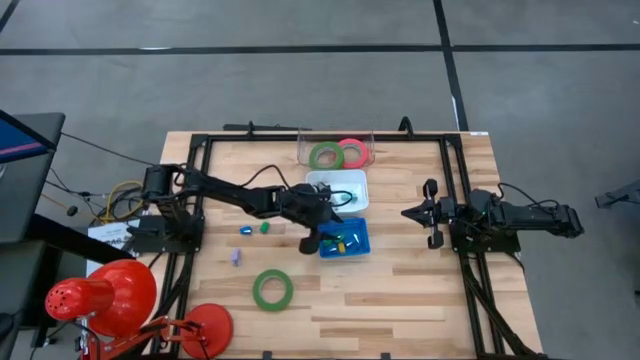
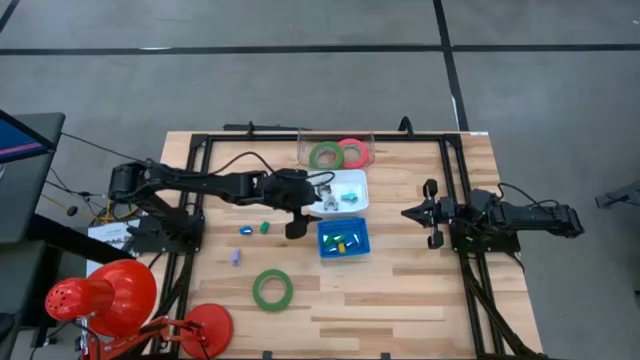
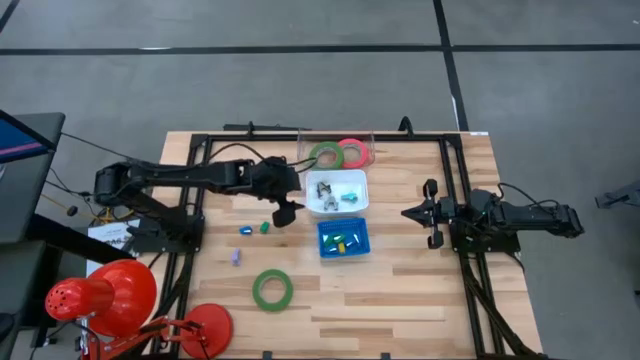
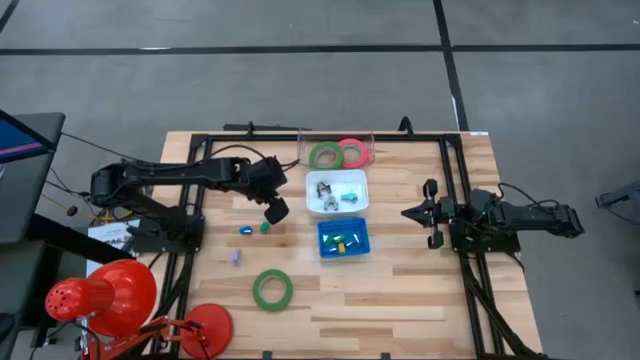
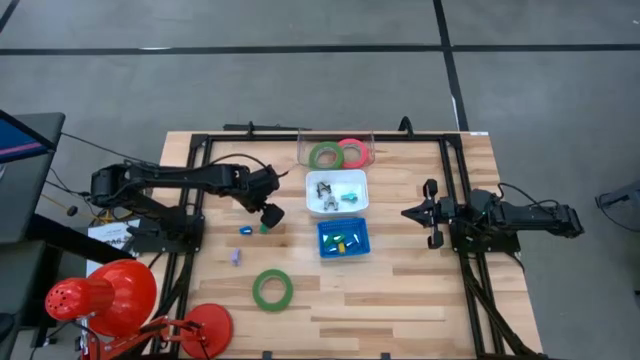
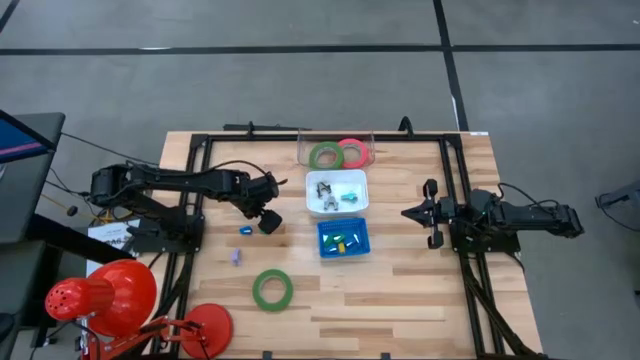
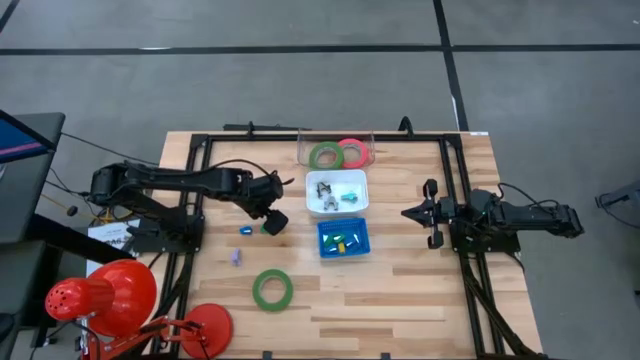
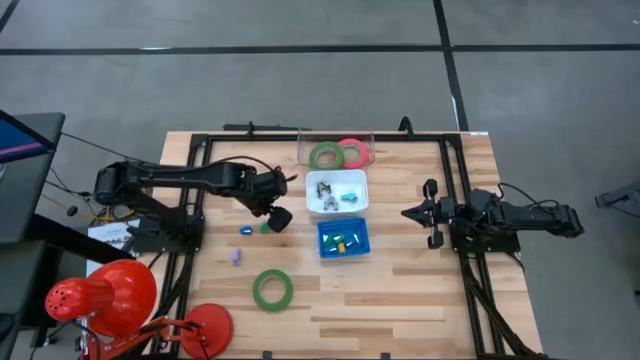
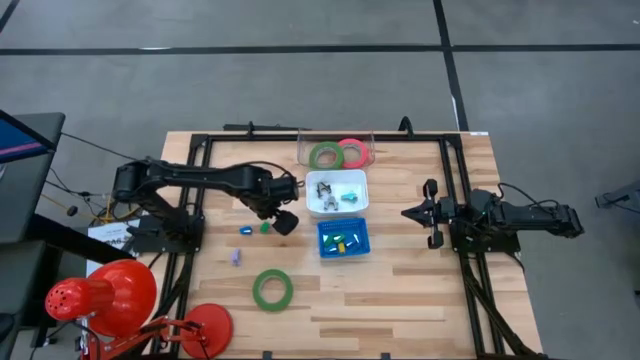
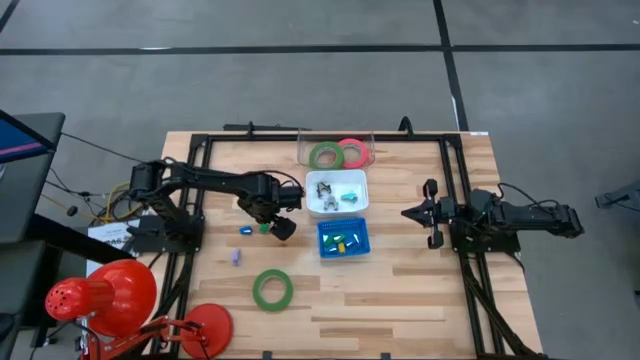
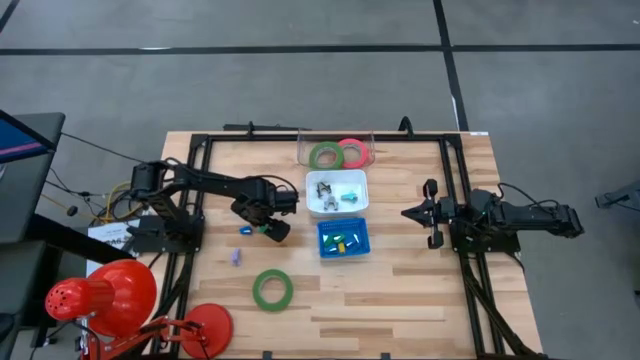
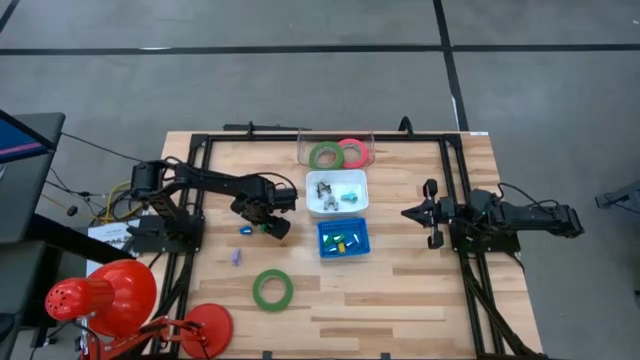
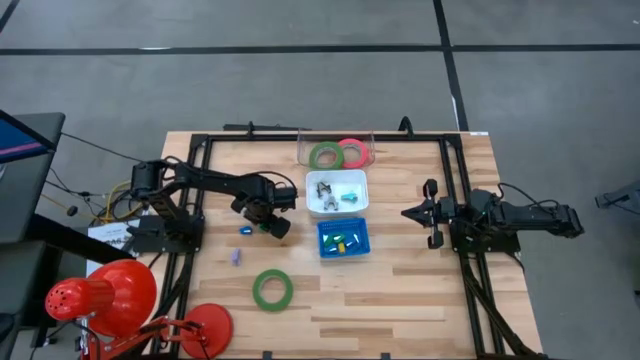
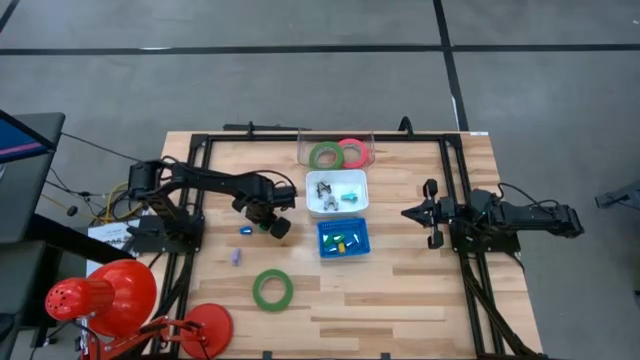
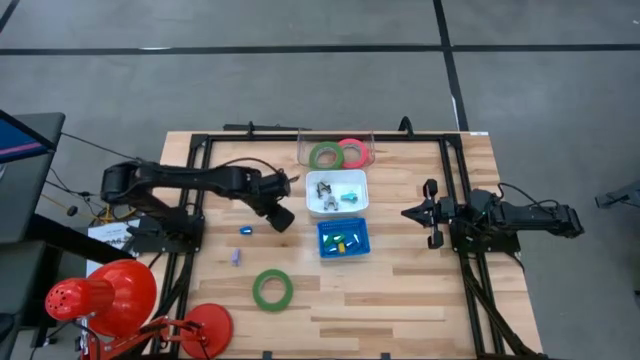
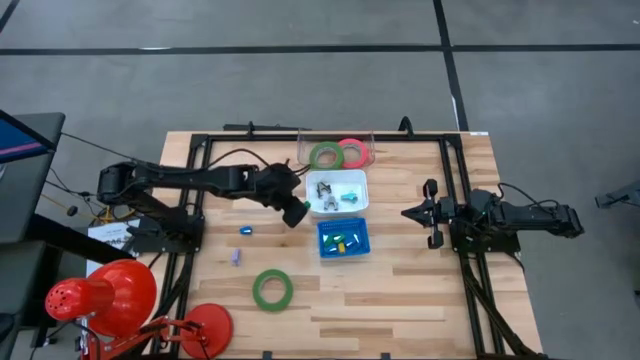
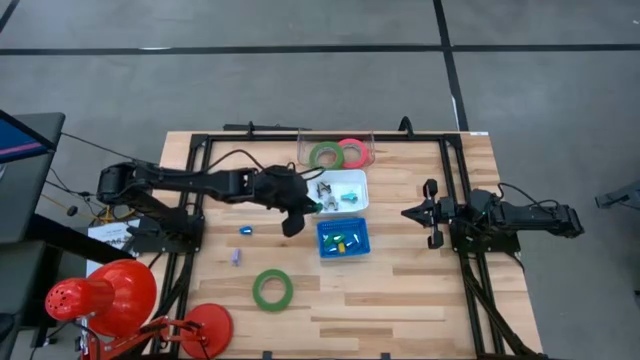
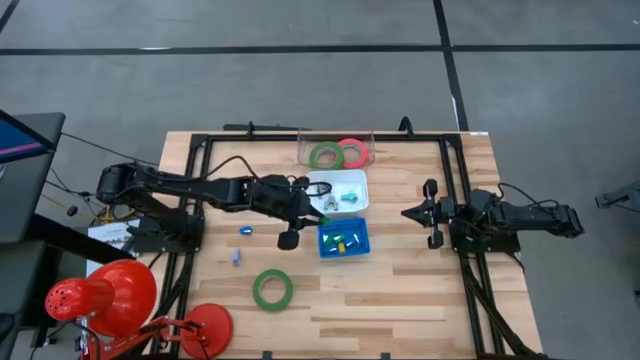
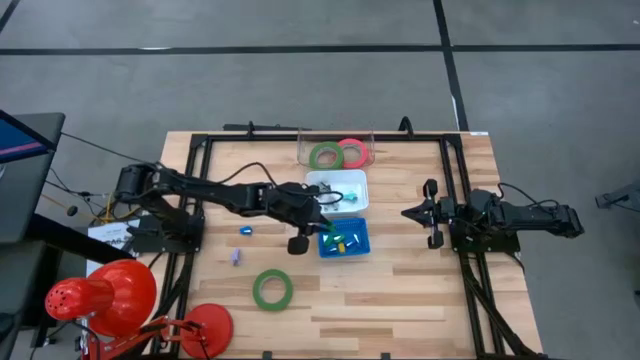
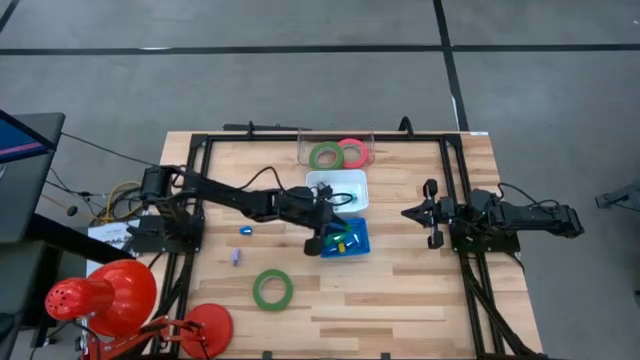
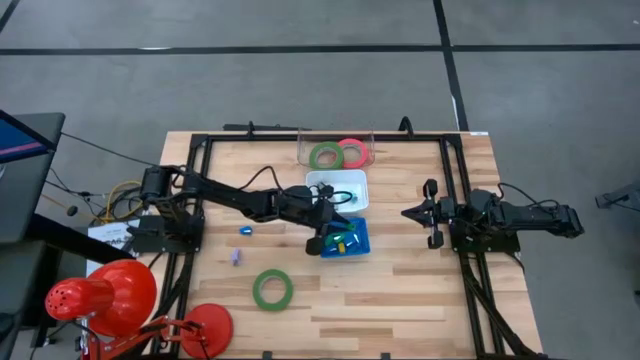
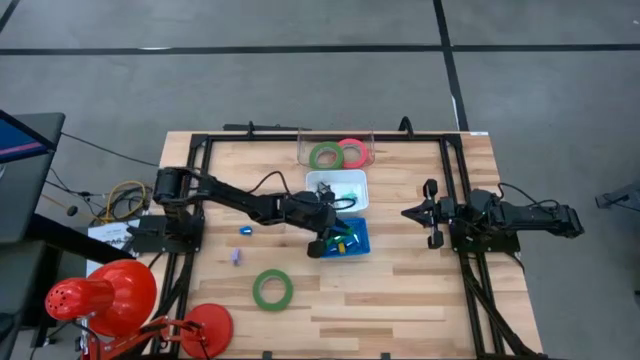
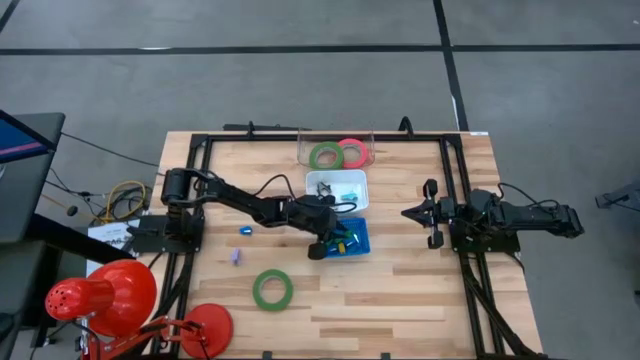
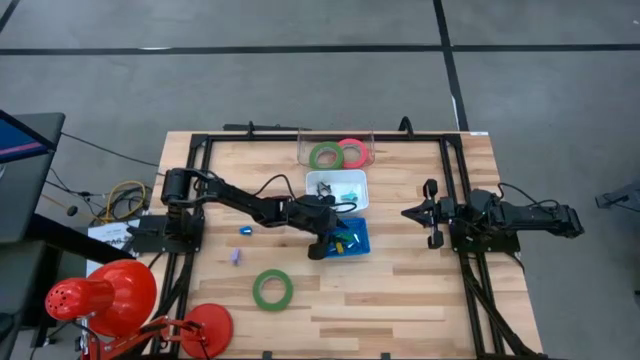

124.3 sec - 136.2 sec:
Task: Pick and place Stapler, Stapler remover, tape
Put the green stapler into the blue bin

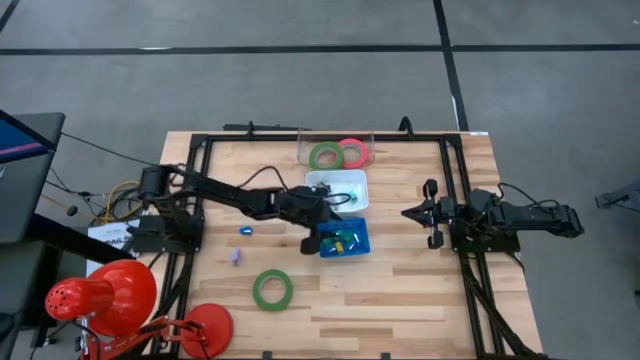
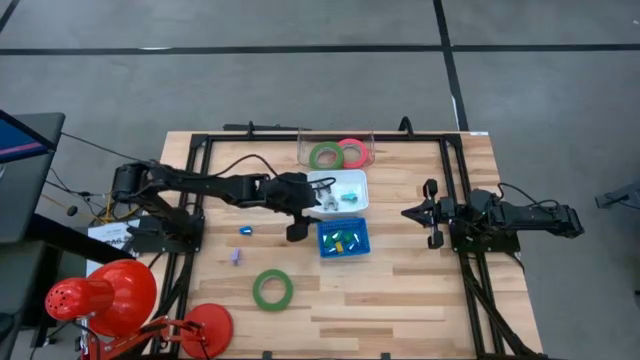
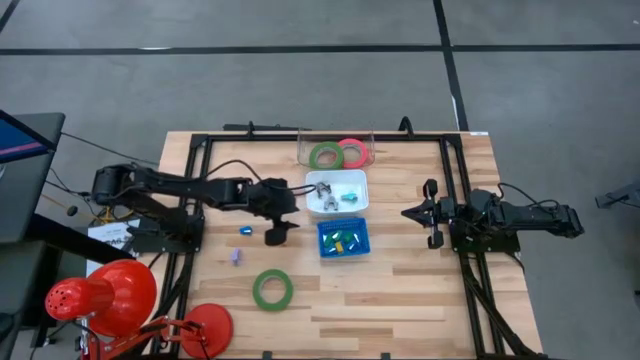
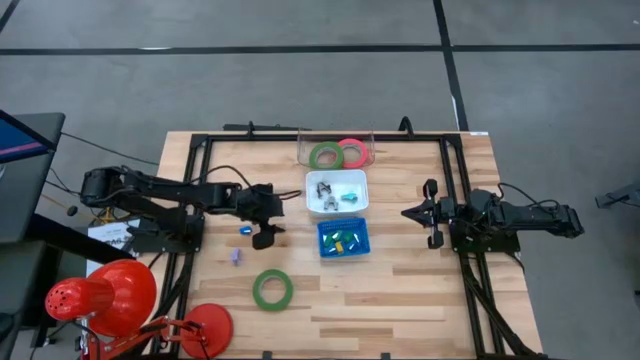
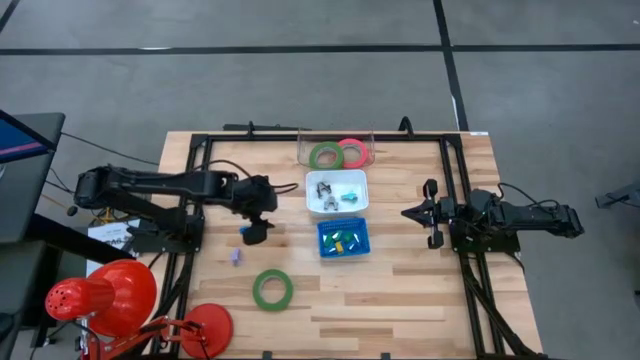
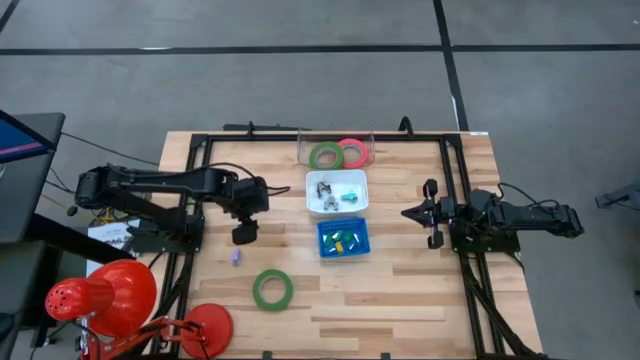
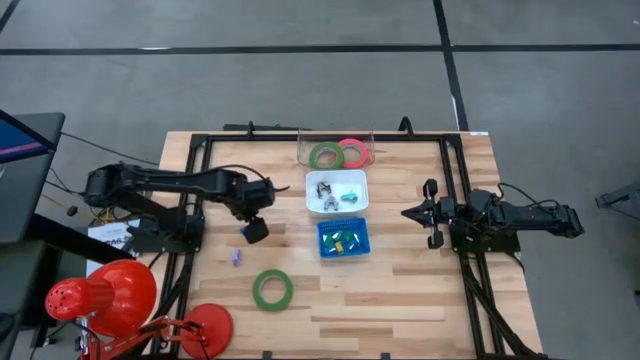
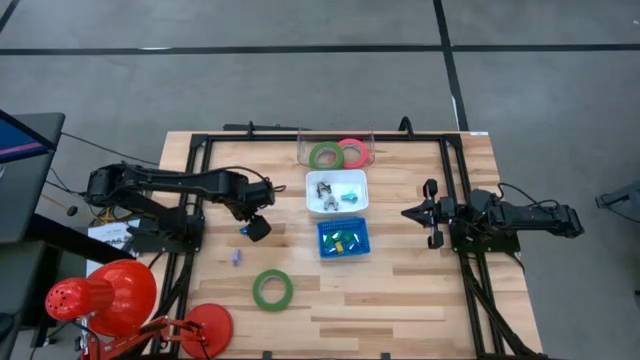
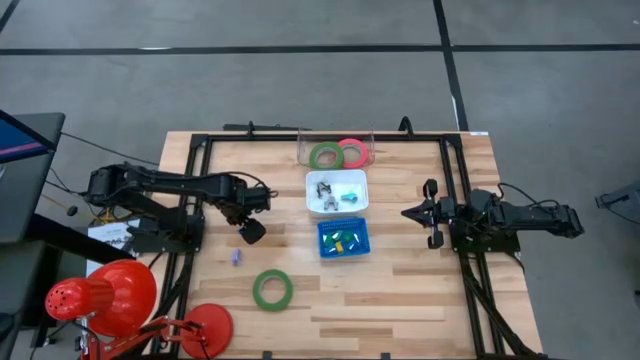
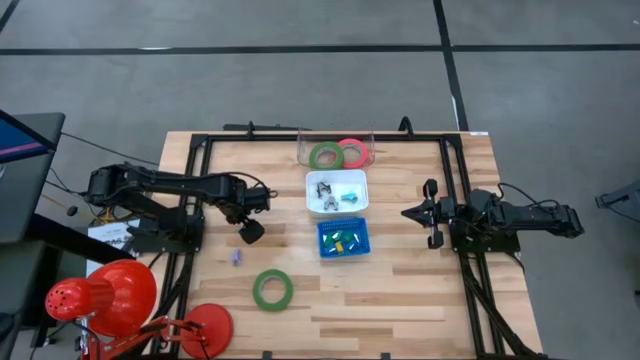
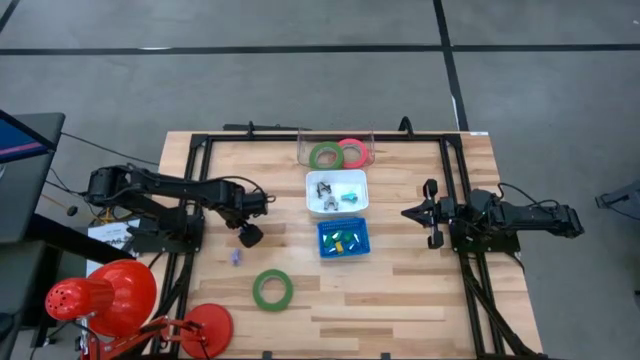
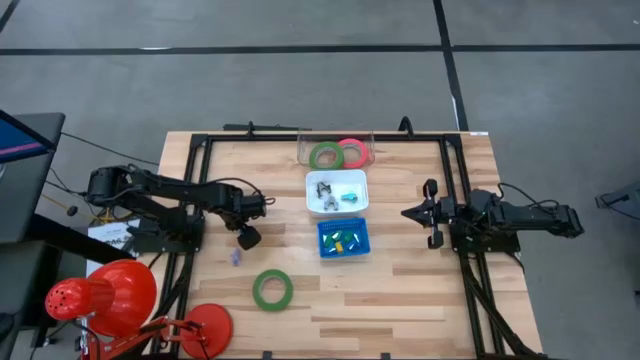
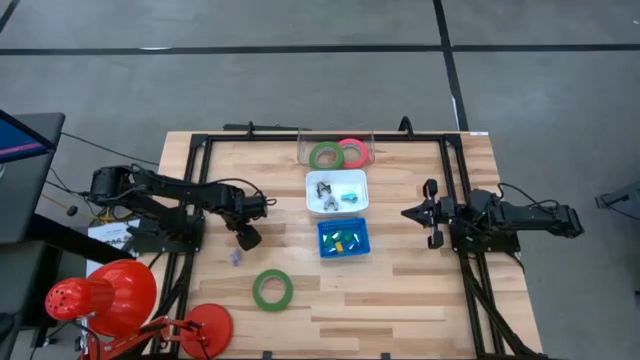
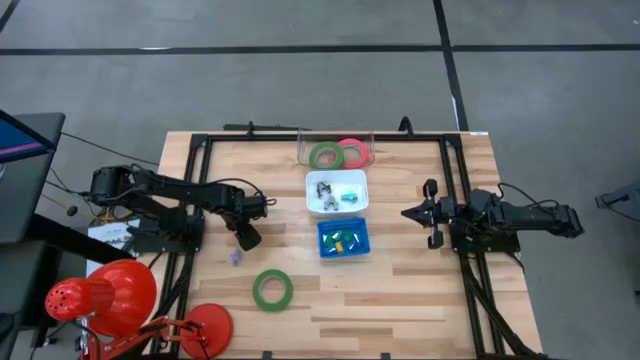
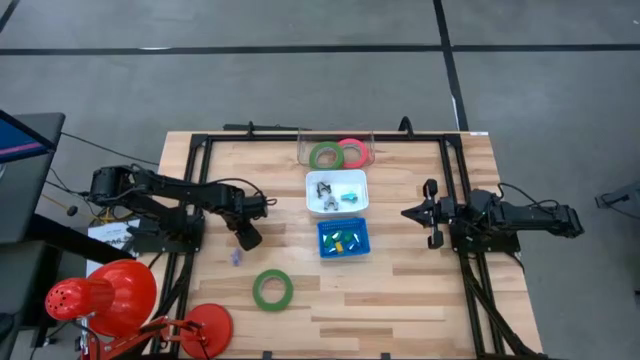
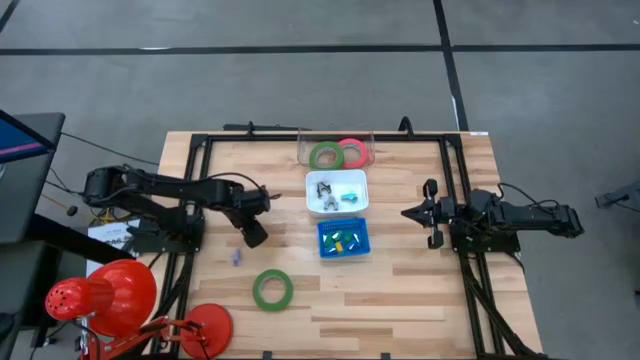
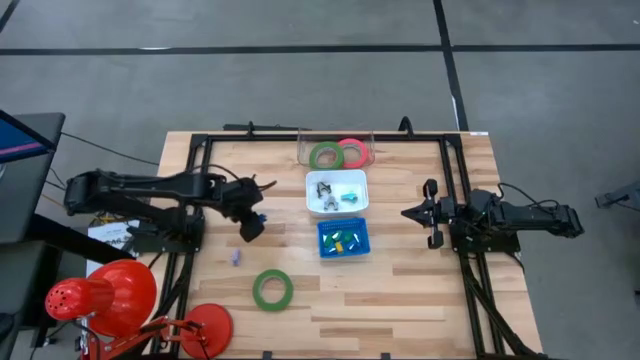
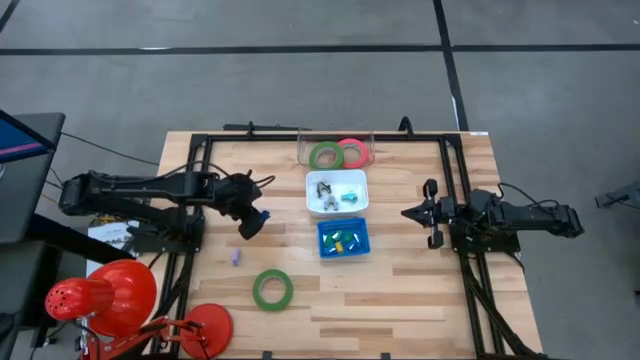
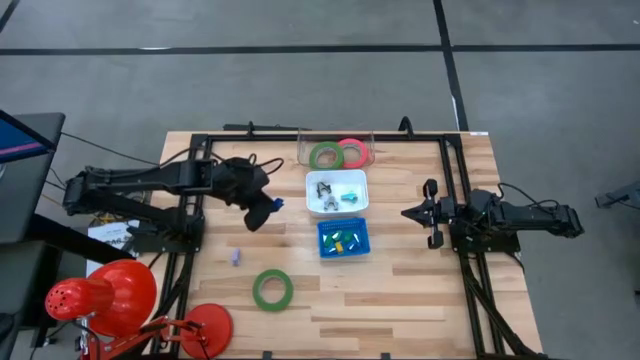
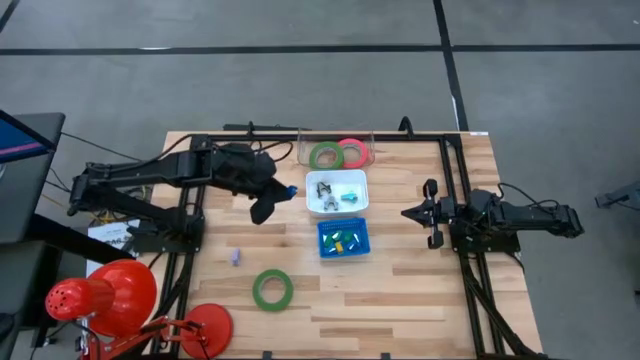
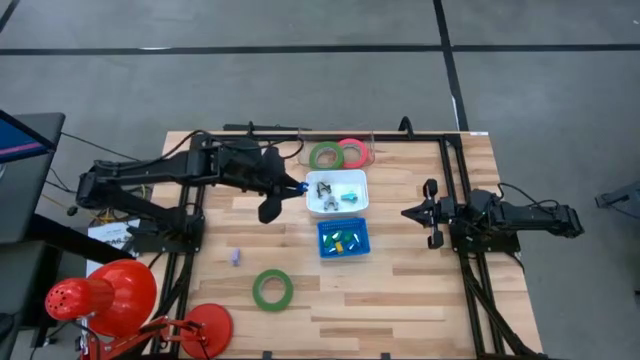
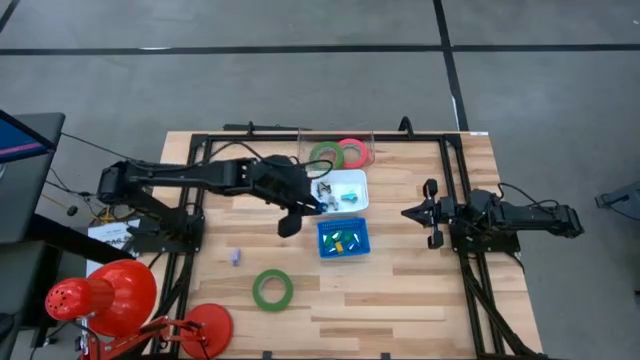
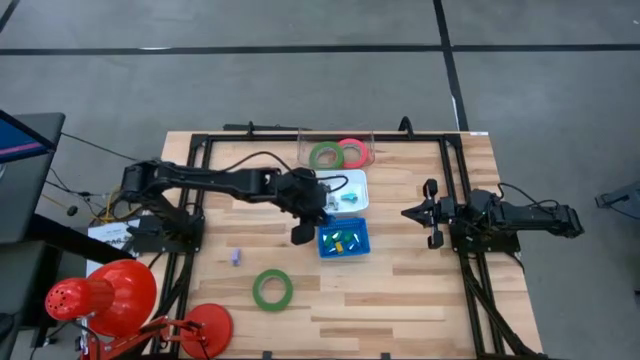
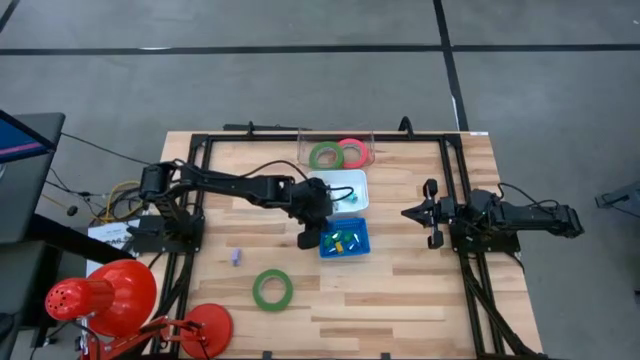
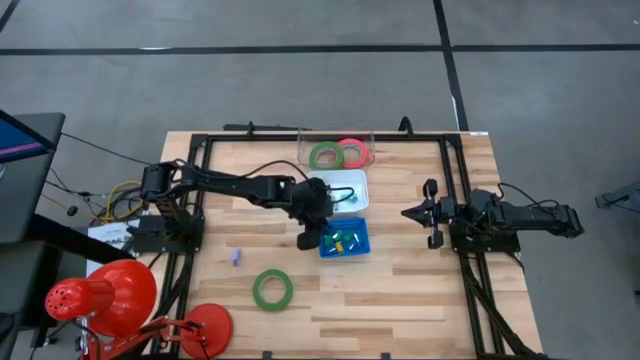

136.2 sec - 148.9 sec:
Put the blue stapler into the blue bin
